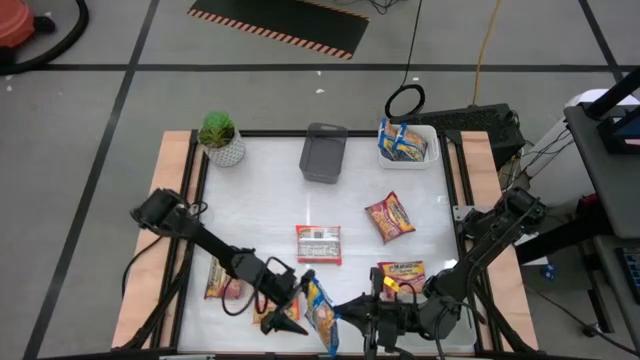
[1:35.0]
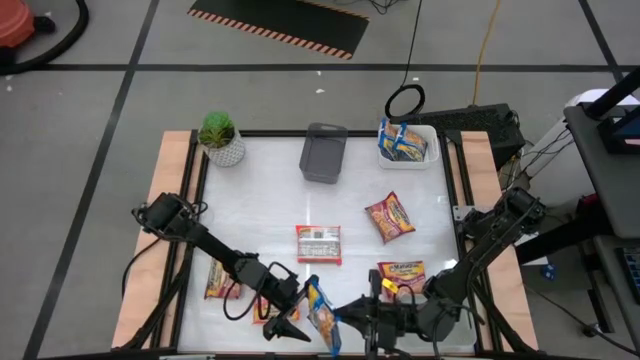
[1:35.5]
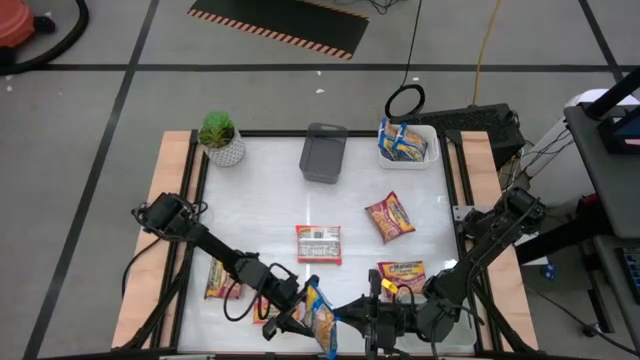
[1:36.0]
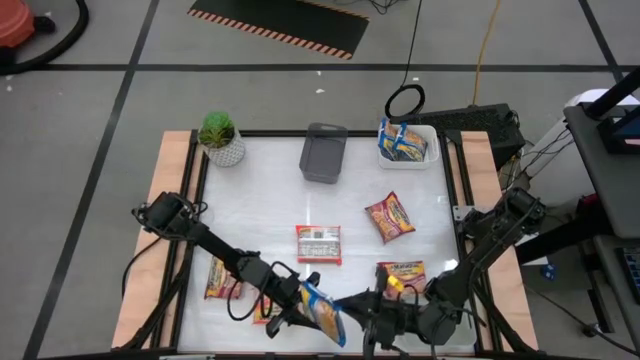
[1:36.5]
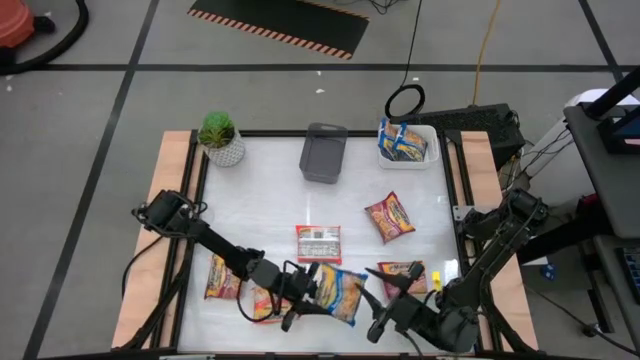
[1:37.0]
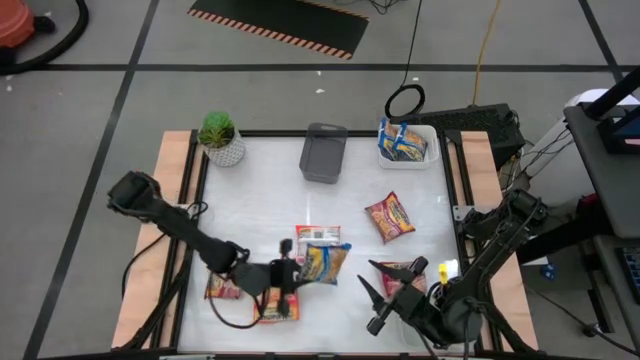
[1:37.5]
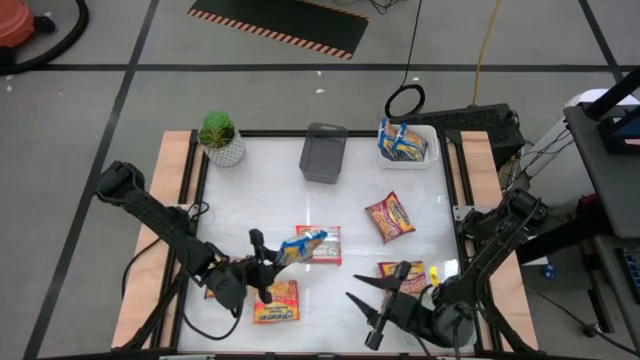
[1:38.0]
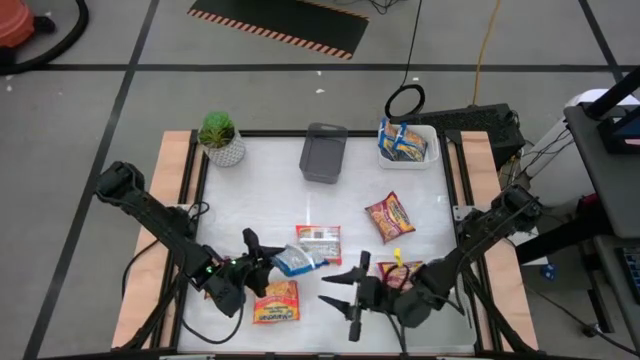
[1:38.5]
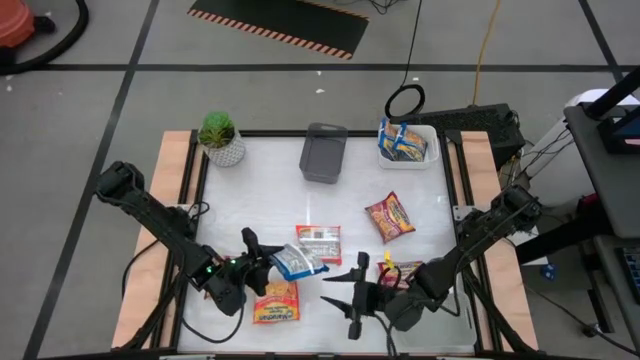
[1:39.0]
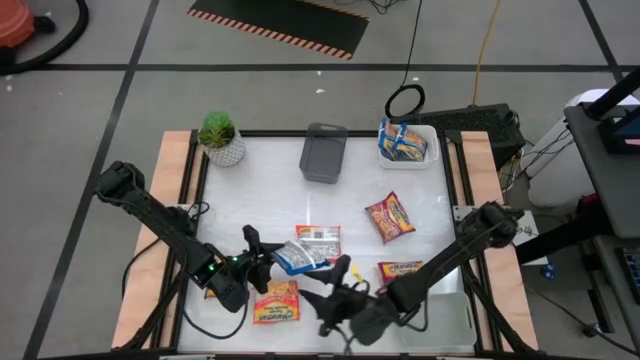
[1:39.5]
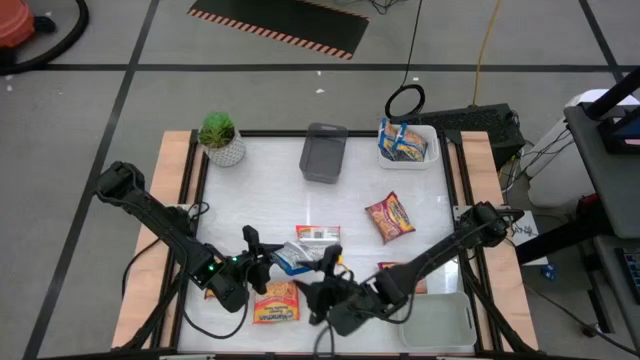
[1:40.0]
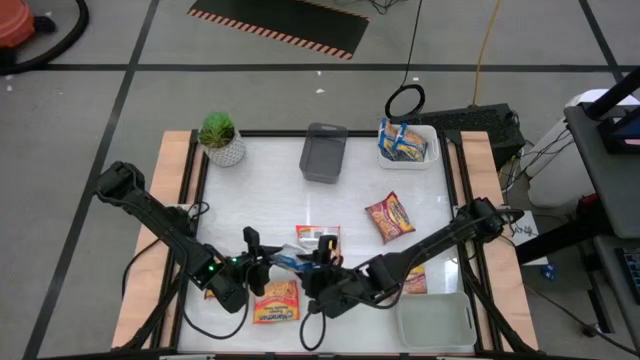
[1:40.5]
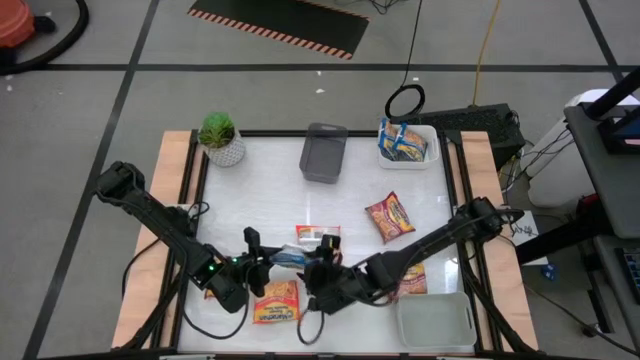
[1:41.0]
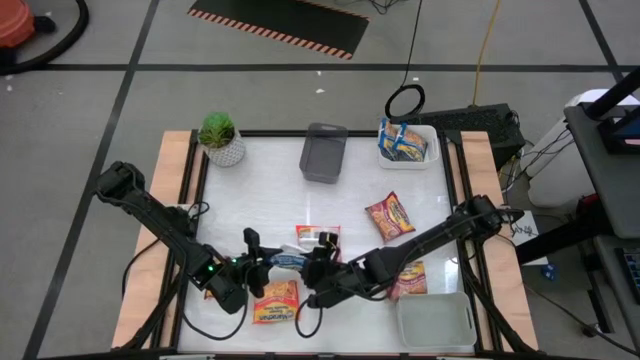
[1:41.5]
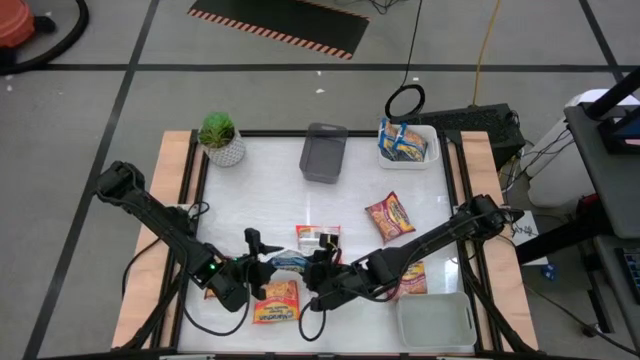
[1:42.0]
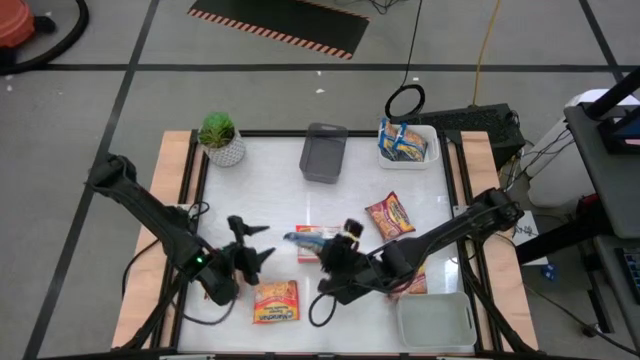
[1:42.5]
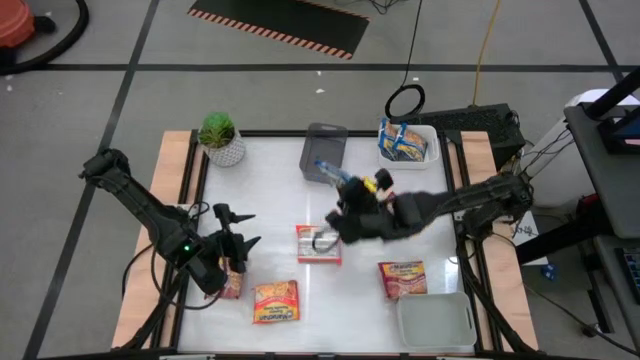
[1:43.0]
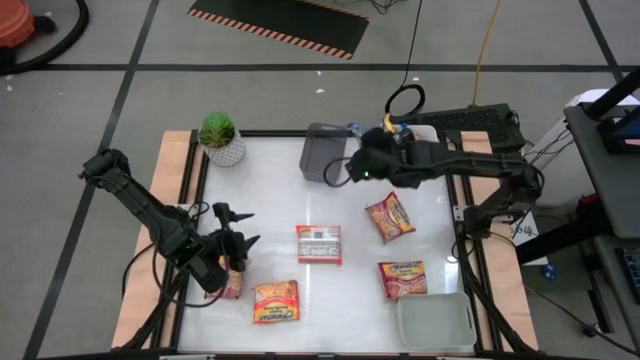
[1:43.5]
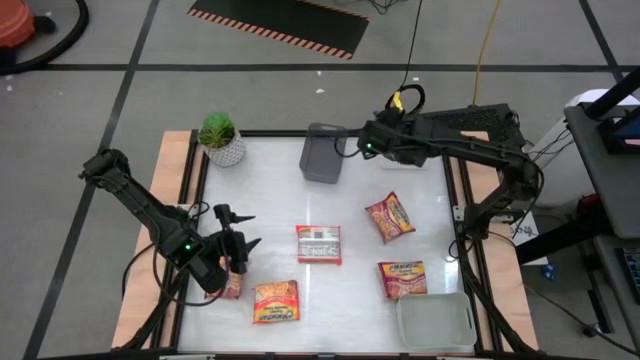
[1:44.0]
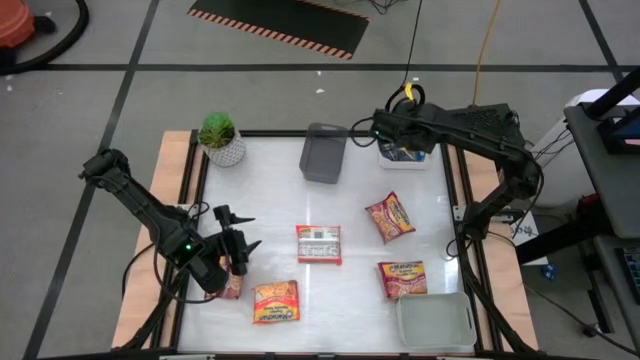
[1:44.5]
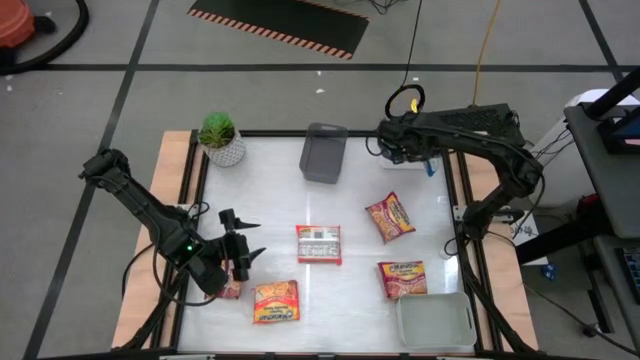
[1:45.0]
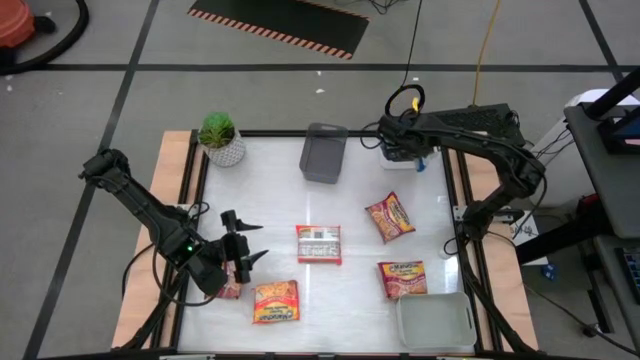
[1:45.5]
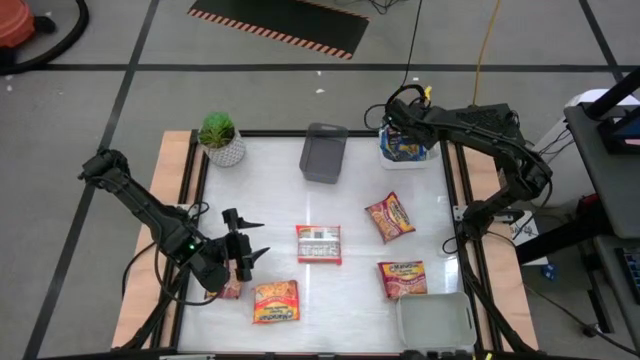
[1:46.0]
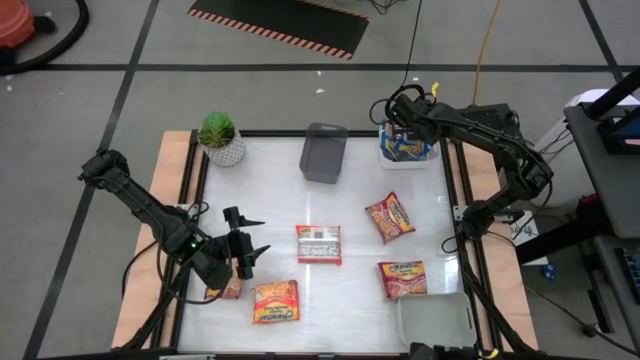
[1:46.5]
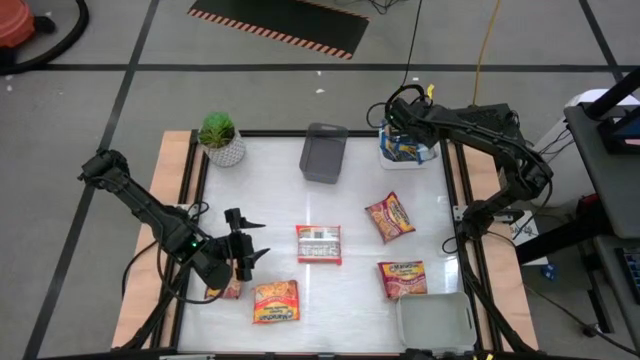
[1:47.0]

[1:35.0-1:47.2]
Task: Sort Maruchan noodles
Put the blue noodle pack into the white bin

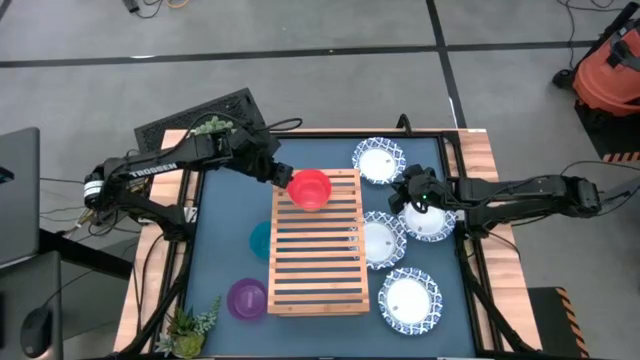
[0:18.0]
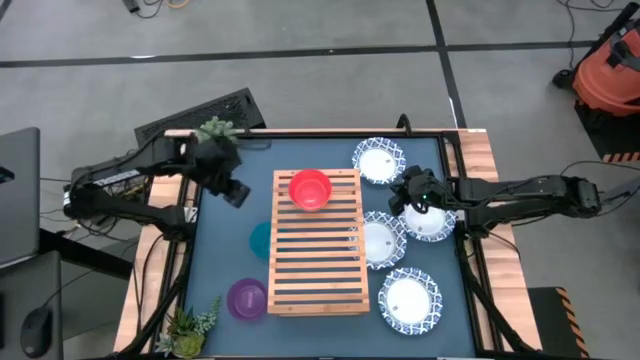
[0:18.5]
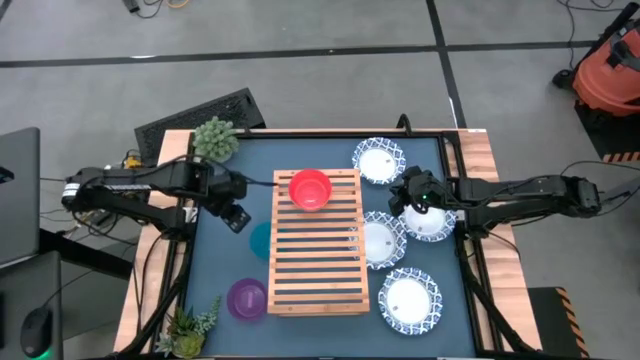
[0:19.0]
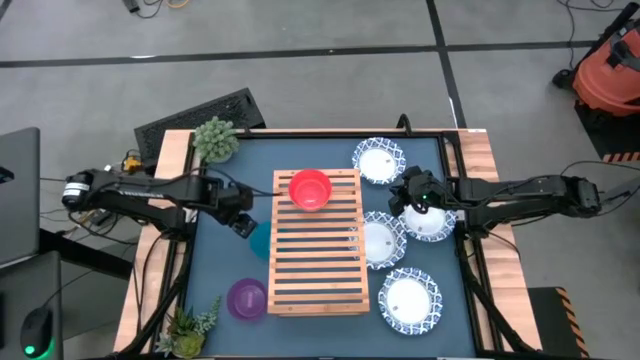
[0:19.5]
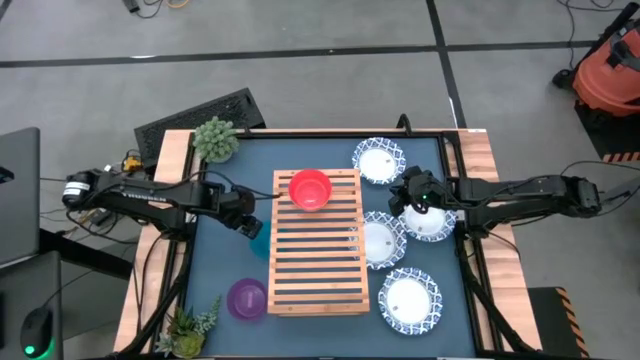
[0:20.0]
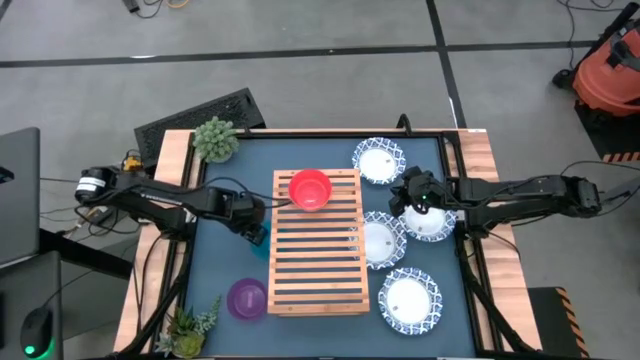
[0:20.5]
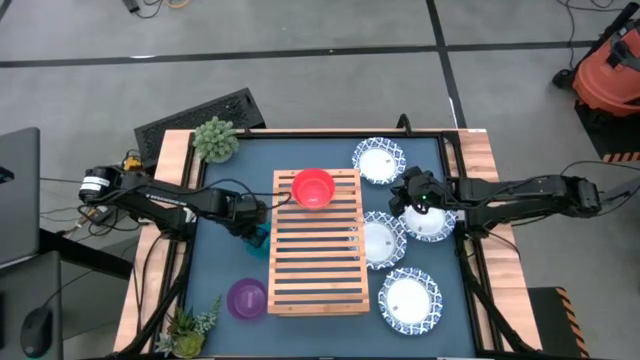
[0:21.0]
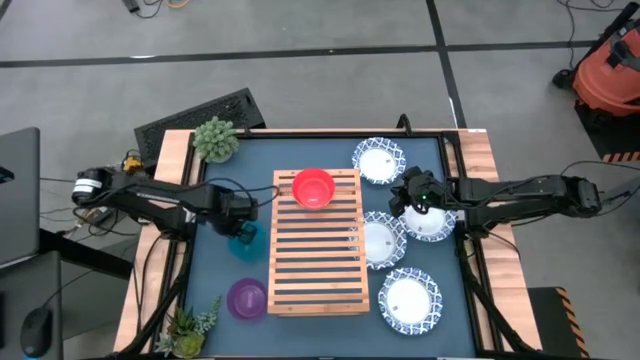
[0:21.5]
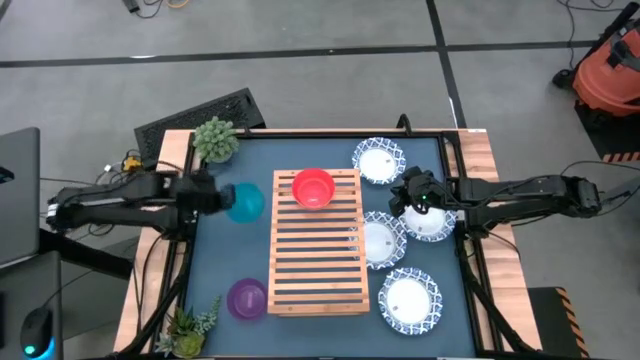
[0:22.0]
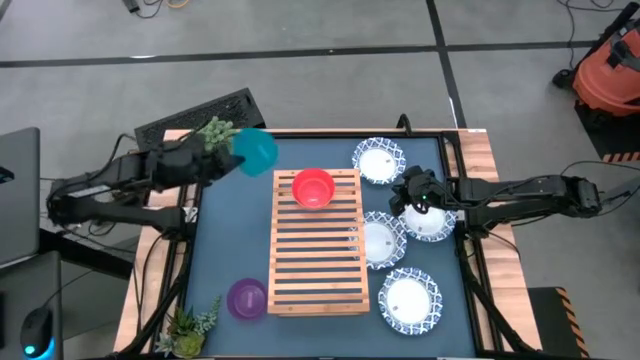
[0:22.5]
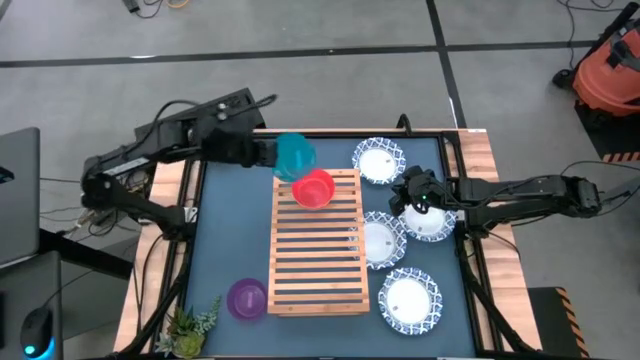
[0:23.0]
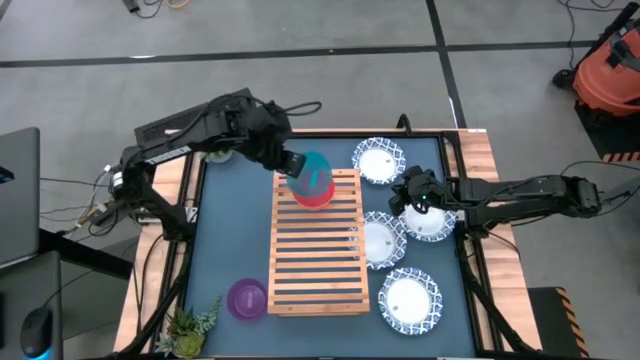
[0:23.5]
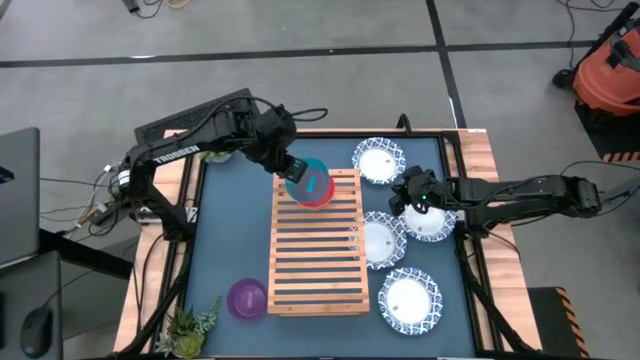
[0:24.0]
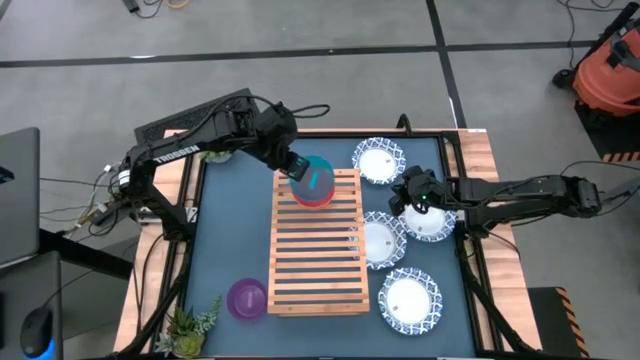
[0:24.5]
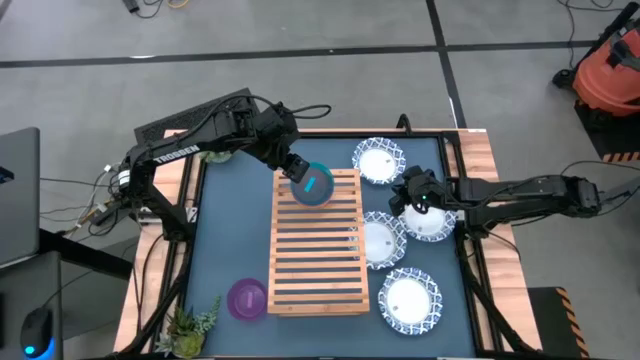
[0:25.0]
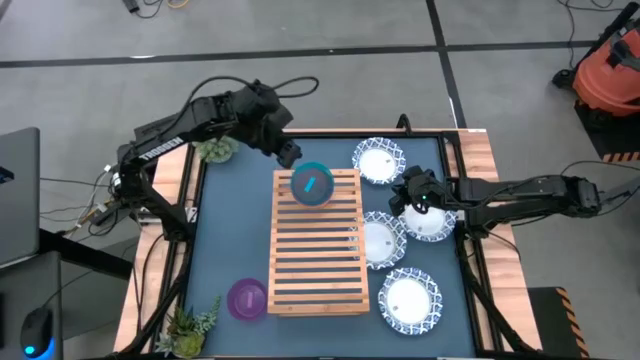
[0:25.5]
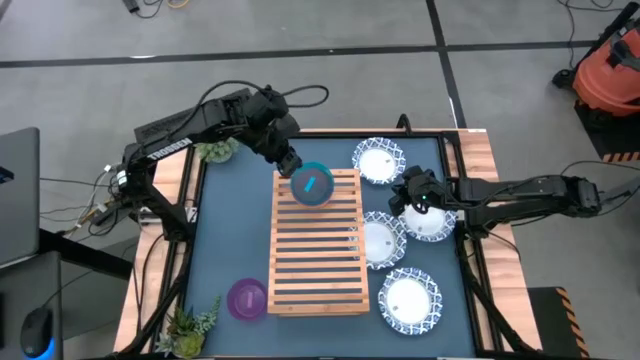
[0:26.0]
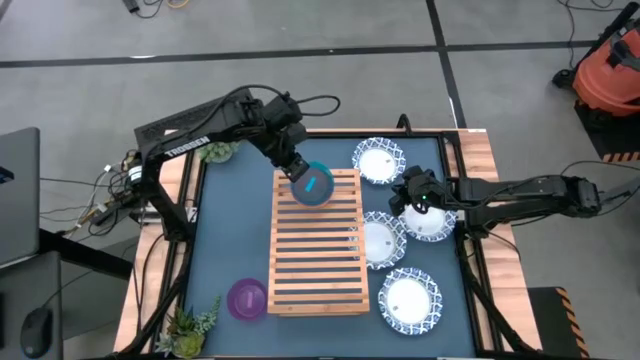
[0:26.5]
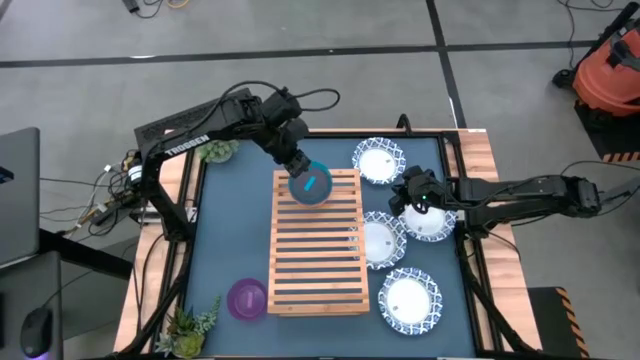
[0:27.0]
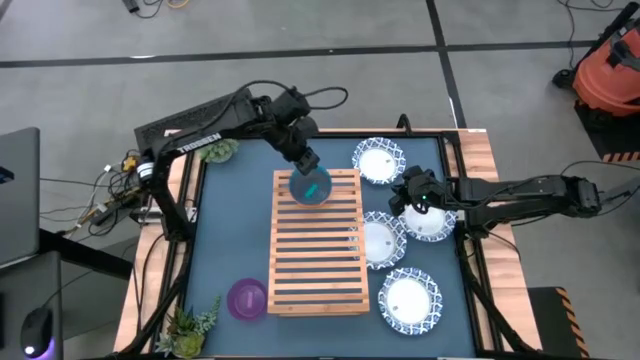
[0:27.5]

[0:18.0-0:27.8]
Task: Place and stack bowls onto a shelf
Stack the small blue bowl on top of the small orange bowl
